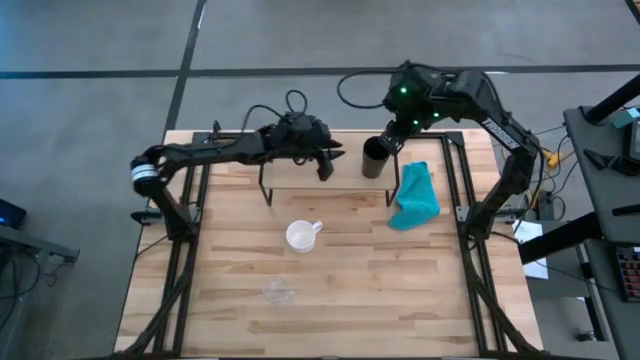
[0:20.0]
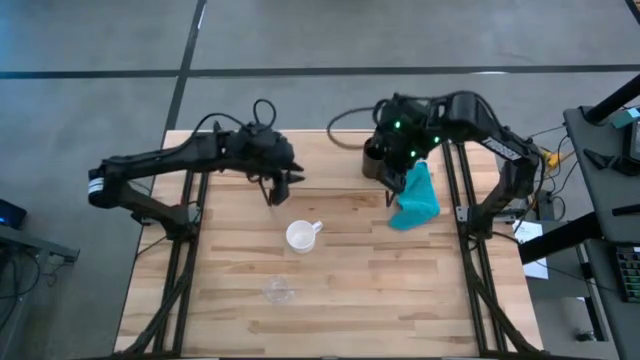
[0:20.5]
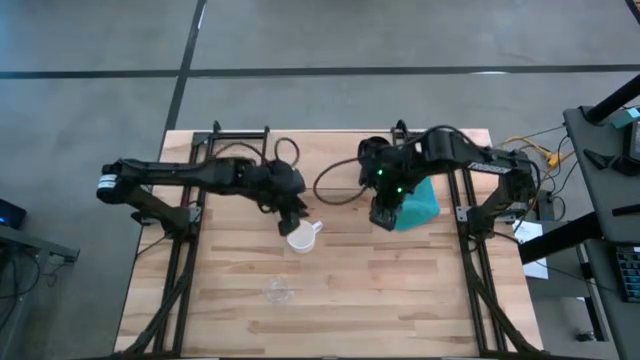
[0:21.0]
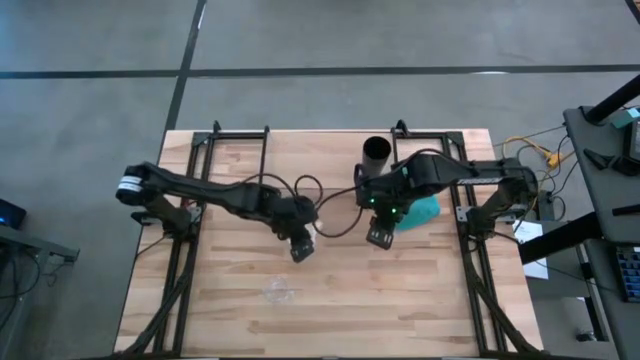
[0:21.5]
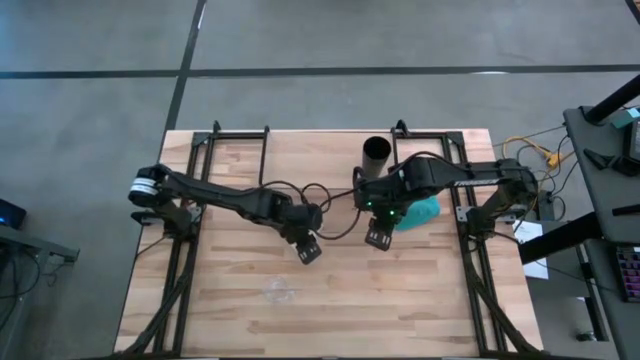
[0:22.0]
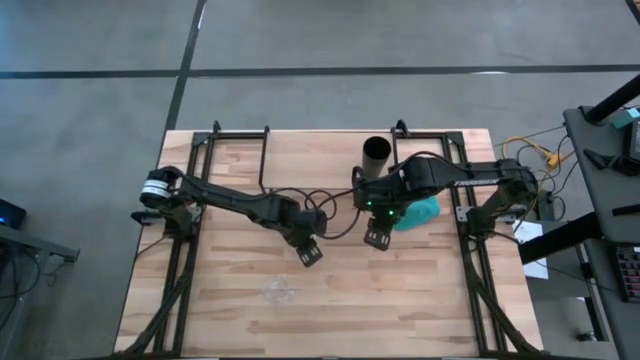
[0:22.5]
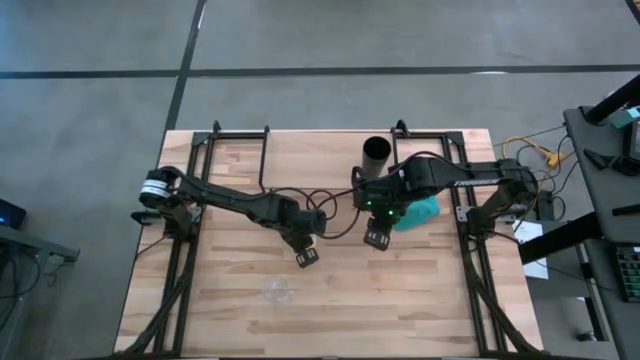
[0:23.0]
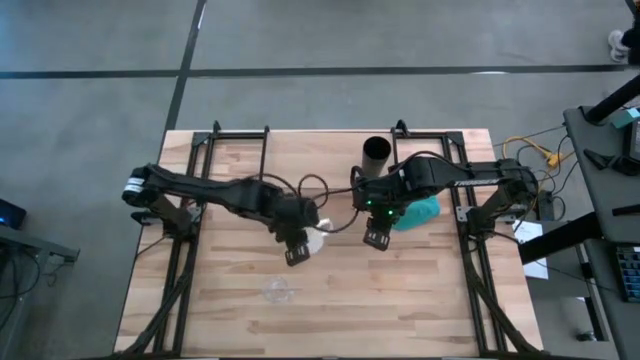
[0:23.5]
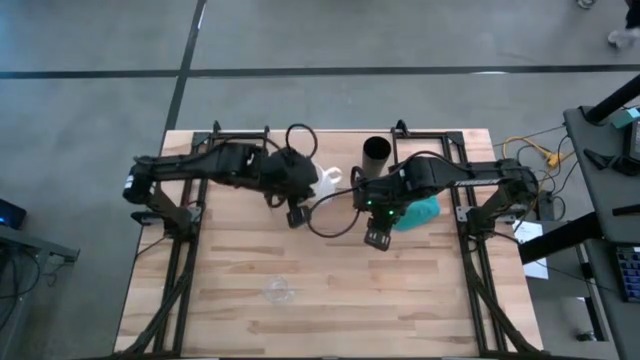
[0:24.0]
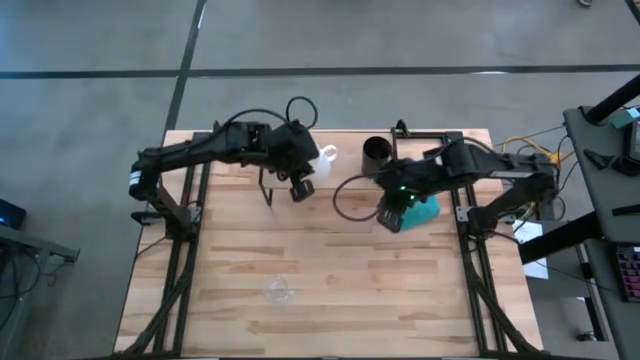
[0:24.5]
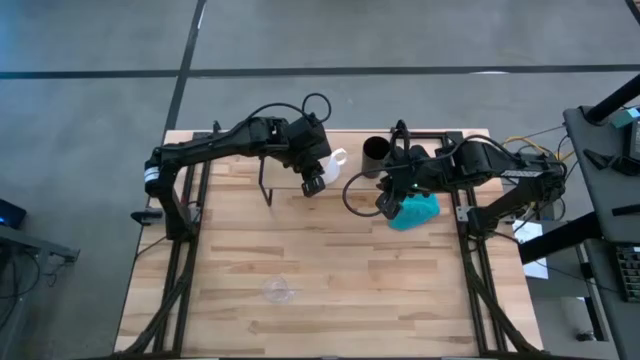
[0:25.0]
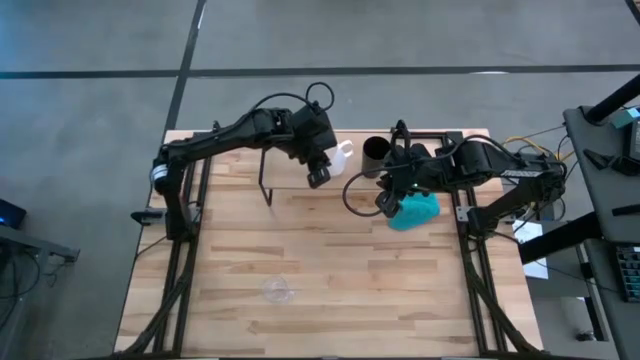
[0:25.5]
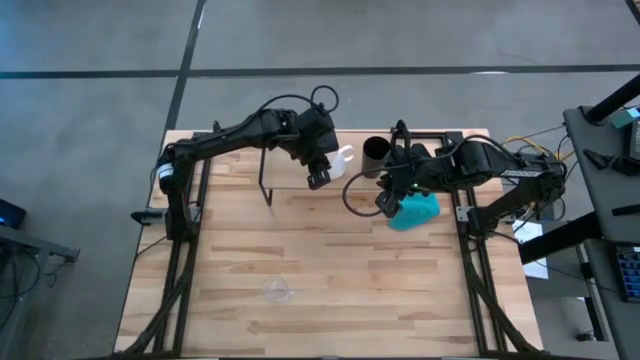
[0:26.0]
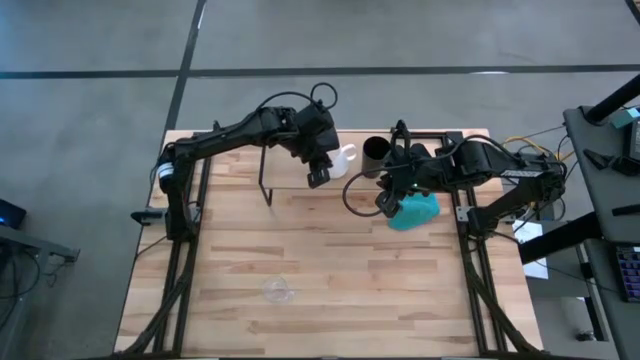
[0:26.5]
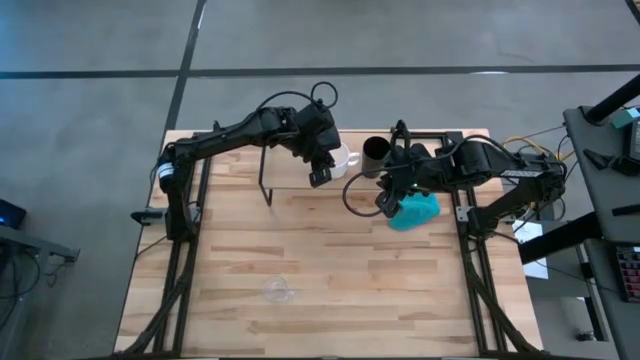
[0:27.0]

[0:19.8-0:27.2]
Task: Stack small to large cups/mugs on shelf
Put the white mug on the shelf

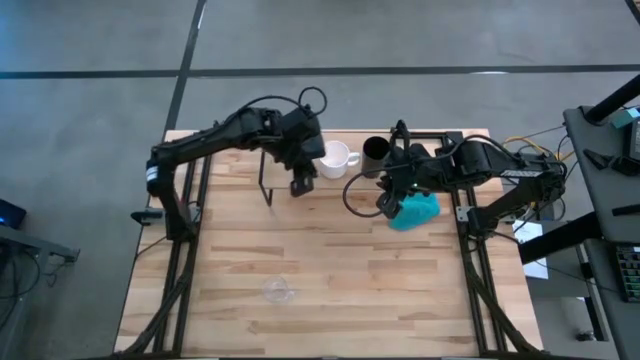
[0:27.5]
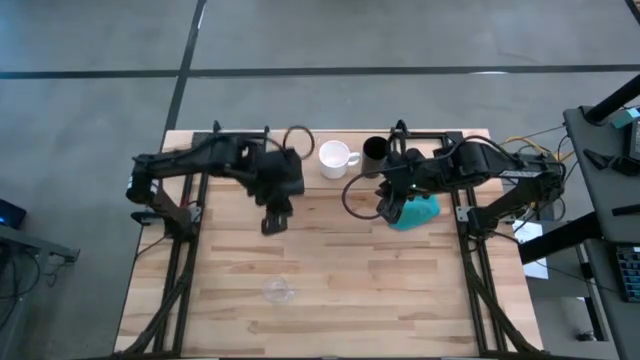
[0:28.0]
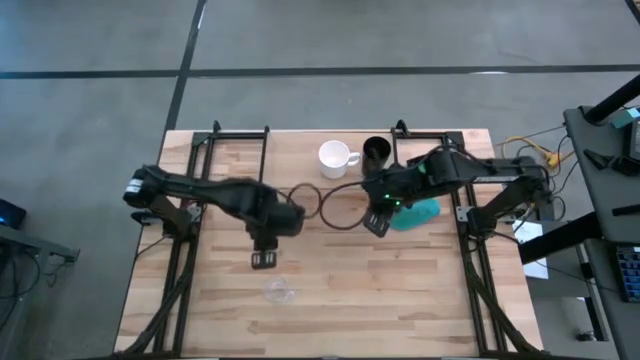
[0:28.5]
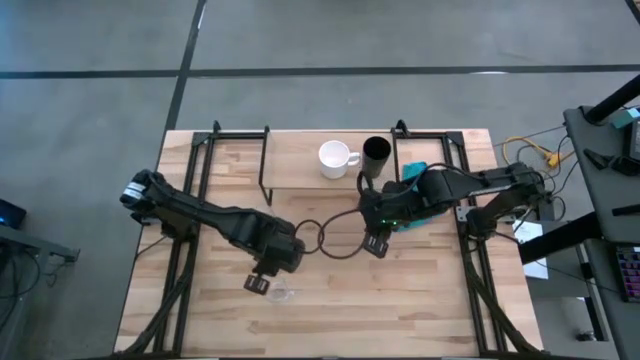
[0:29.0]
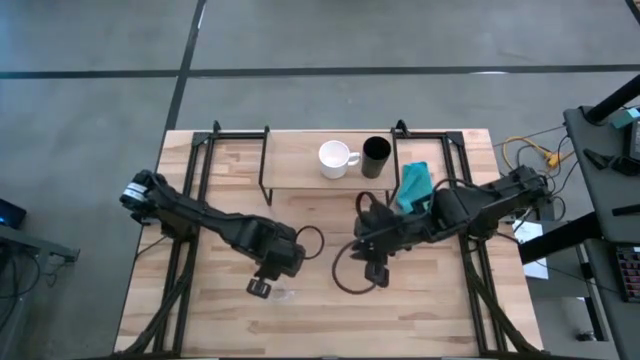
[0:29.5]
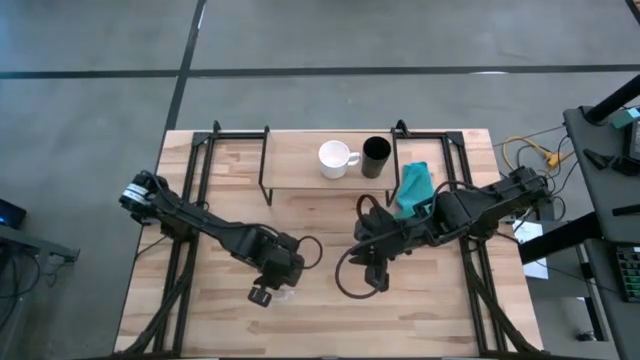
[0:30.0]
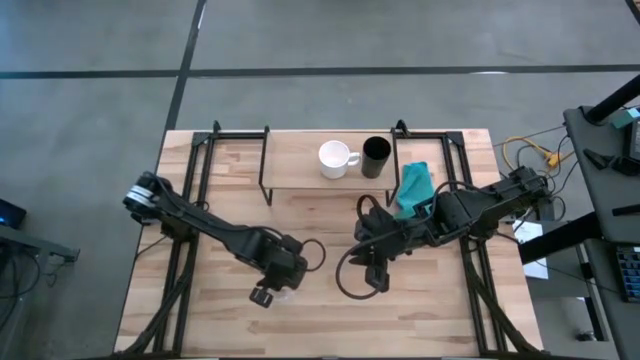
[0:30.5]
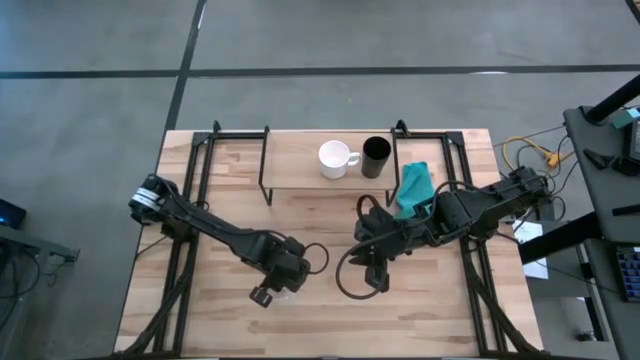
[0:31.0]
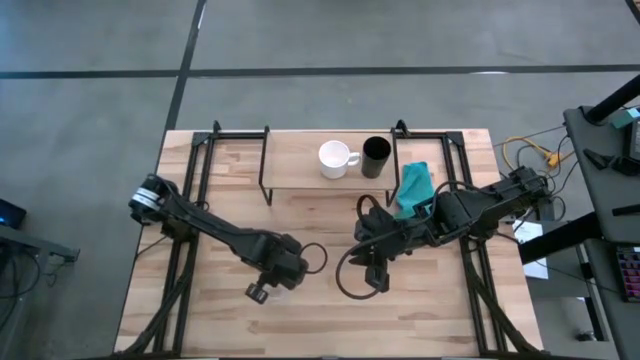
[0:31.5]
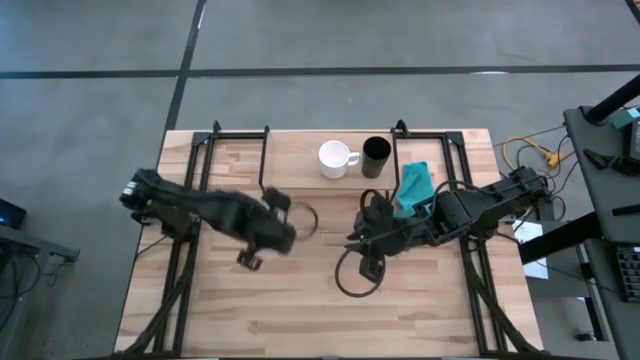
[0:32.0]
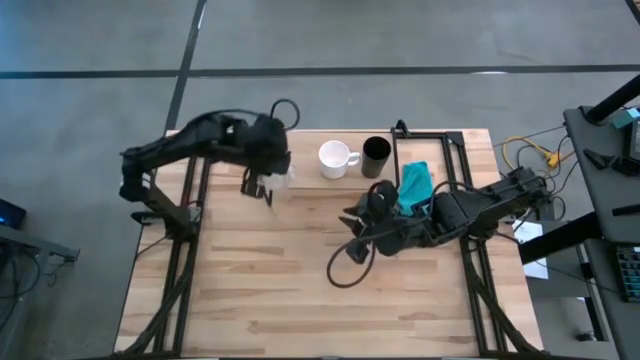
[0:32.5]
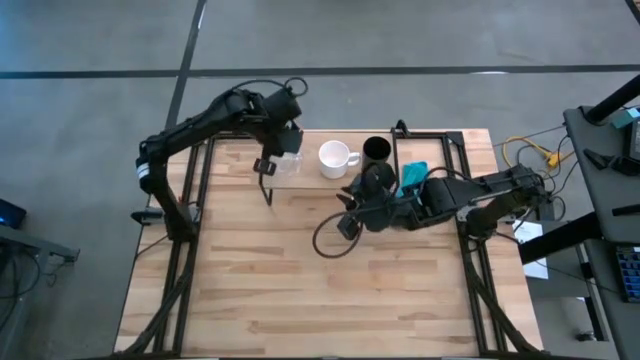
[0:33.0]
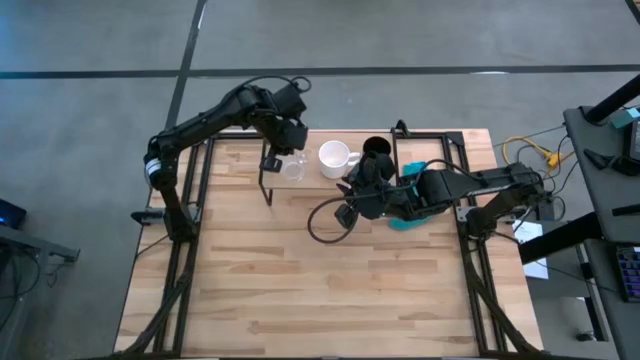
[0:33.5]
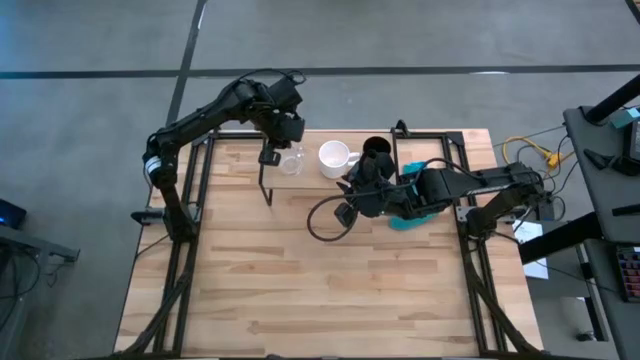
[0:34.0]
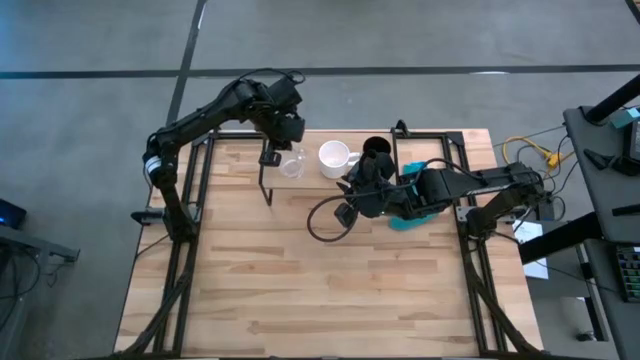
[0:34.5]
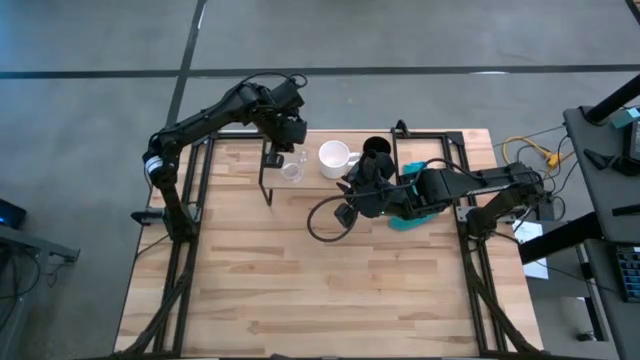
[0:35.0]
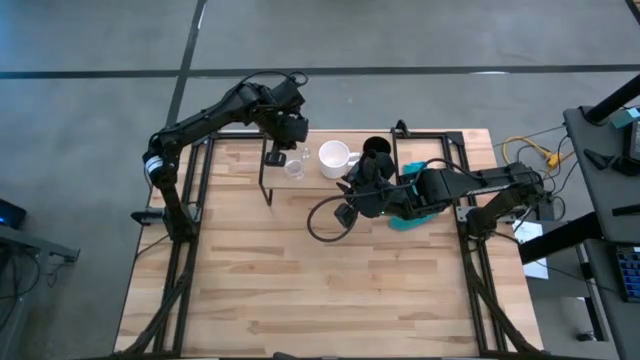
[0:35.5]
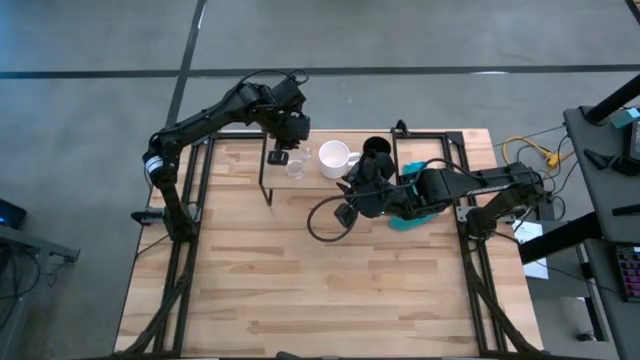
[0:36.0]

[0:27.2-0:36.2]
Put the transparent mug on the shelf

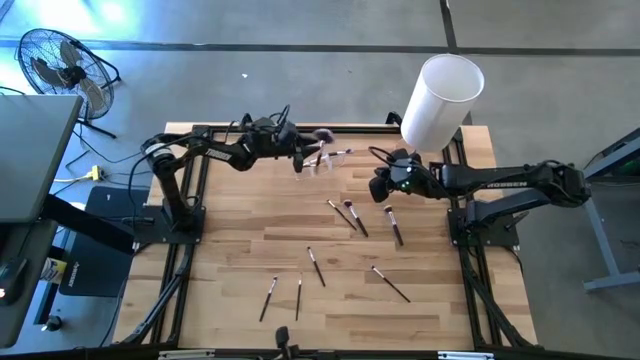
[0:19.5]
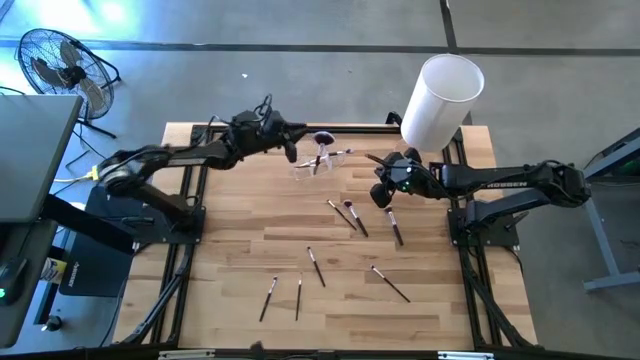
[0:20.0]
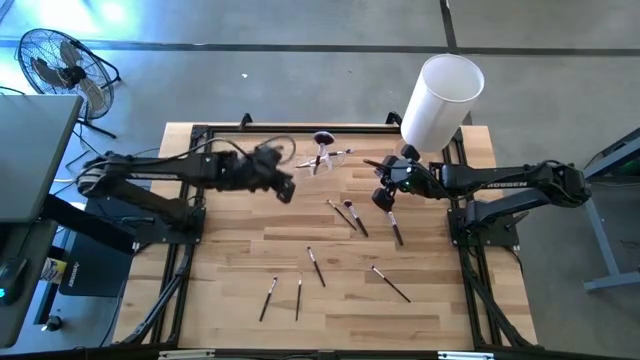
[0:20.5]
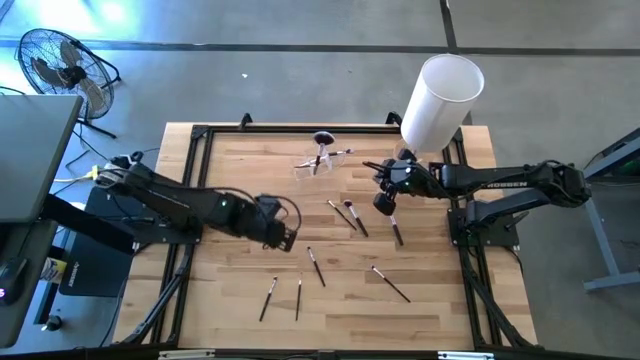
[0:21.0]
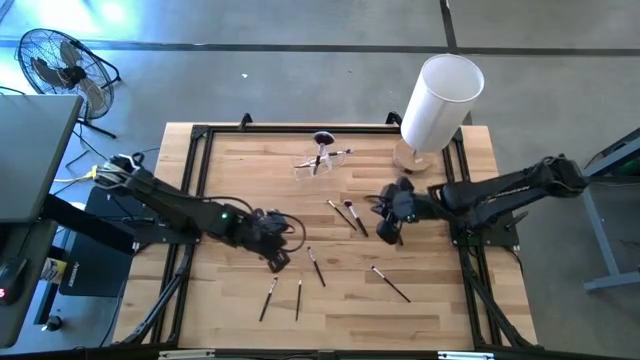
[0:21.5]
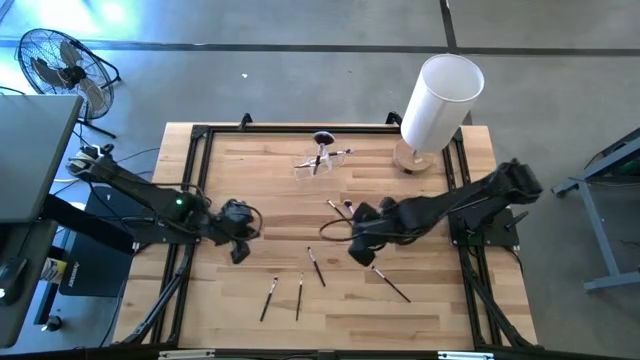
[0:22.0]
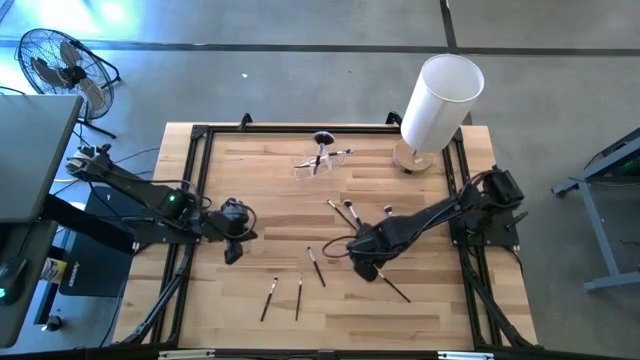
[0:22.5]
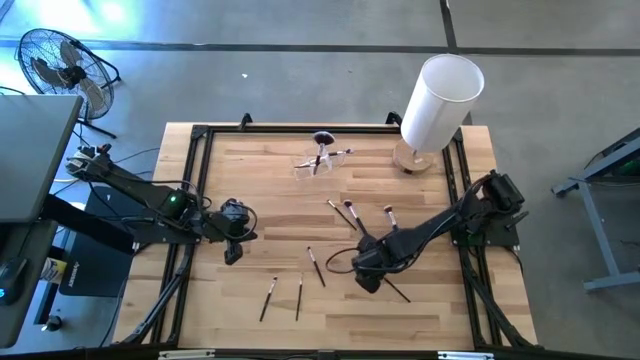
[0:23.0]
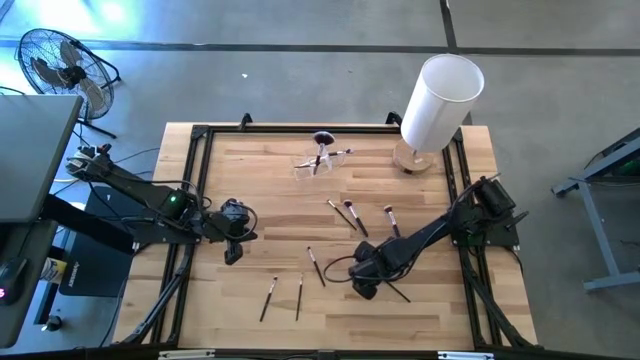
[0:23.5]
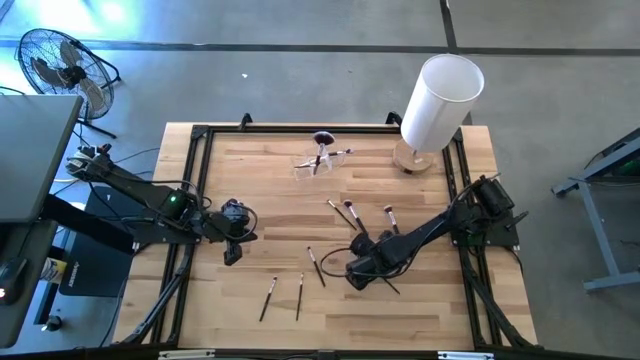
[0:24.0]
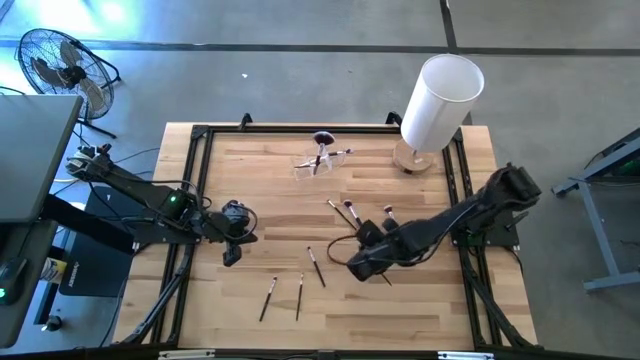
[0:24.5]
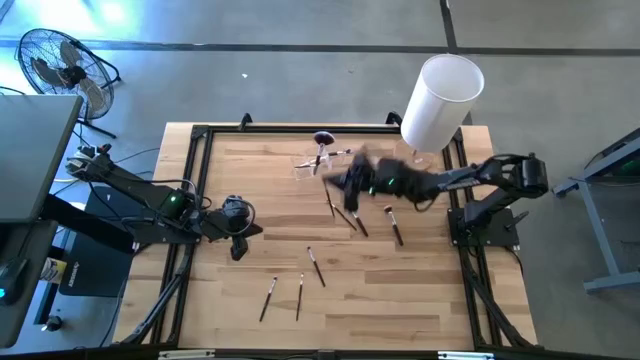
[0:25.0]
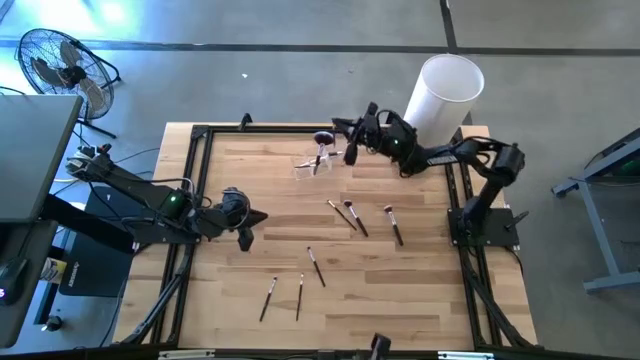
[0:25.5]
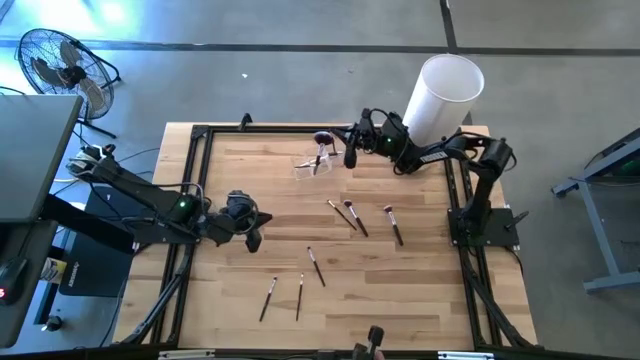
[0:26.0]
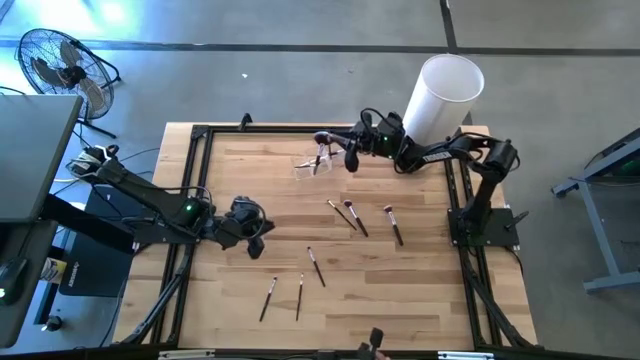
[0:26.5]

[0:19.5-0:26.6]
Task: Put items in baskets/containers
Put the black eyeshadow brush into the transparent organizer
